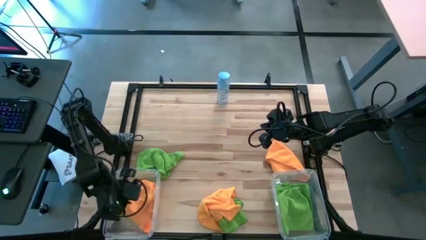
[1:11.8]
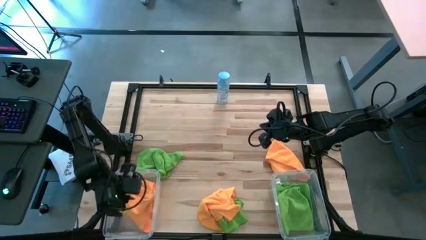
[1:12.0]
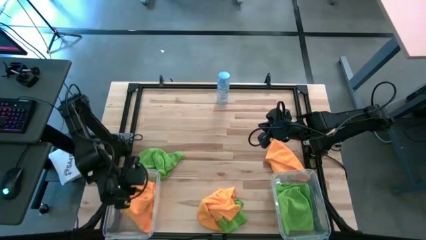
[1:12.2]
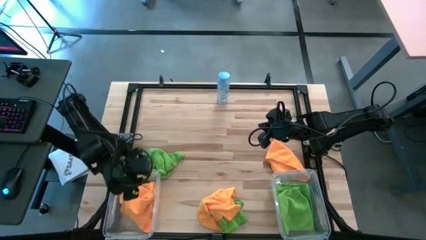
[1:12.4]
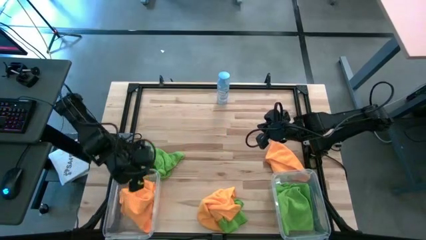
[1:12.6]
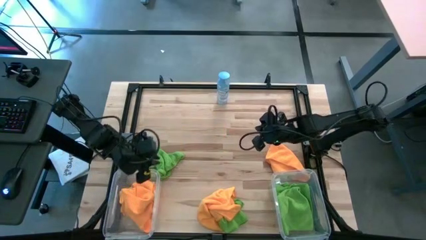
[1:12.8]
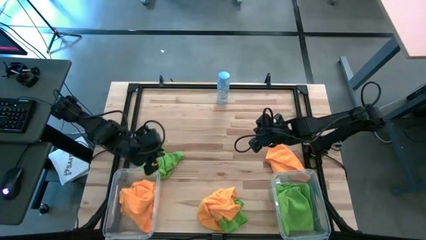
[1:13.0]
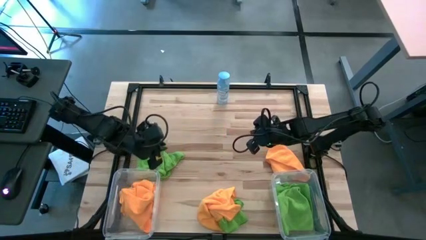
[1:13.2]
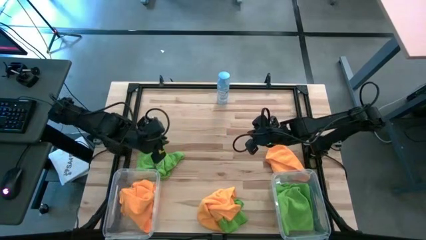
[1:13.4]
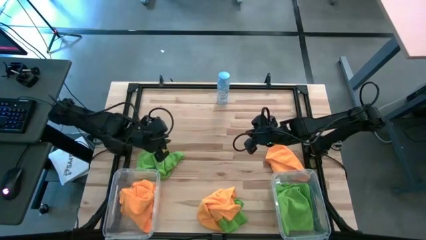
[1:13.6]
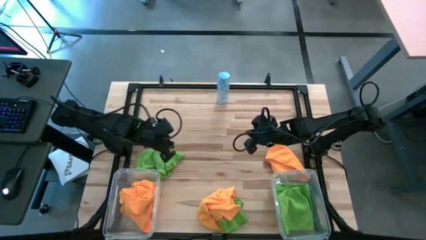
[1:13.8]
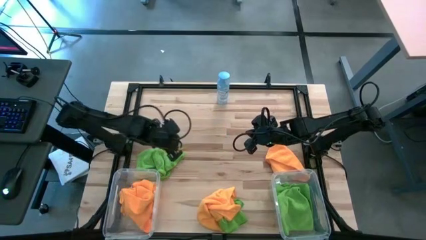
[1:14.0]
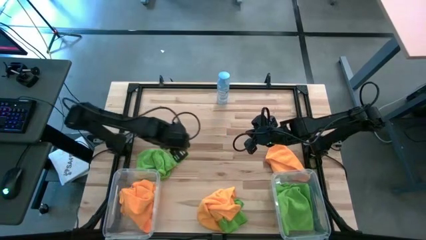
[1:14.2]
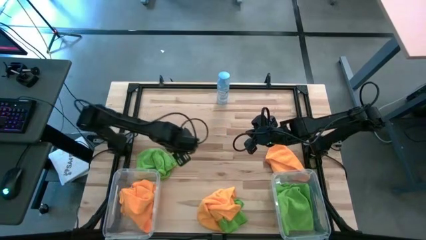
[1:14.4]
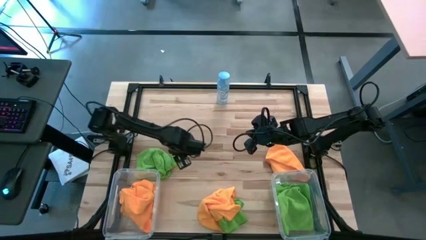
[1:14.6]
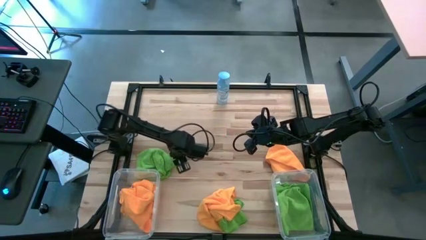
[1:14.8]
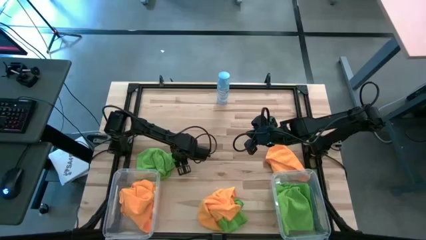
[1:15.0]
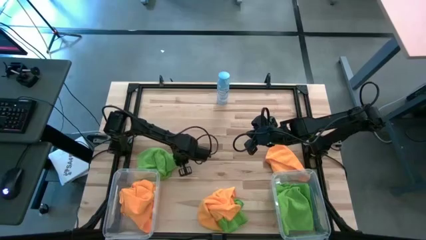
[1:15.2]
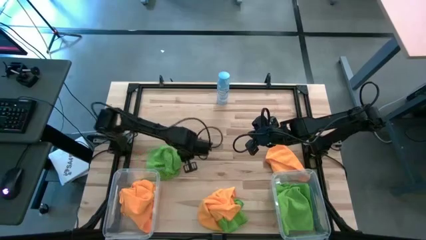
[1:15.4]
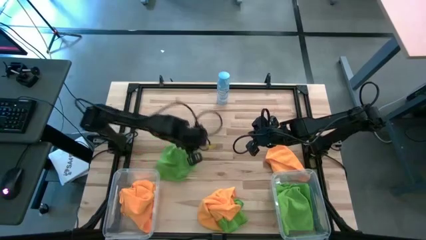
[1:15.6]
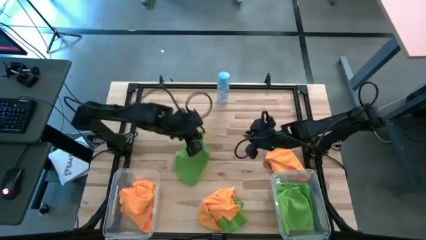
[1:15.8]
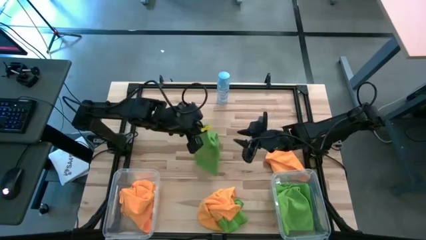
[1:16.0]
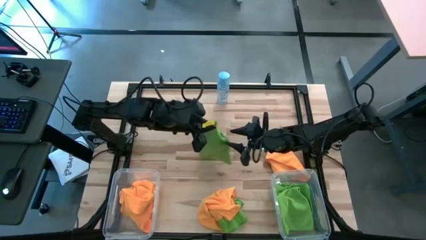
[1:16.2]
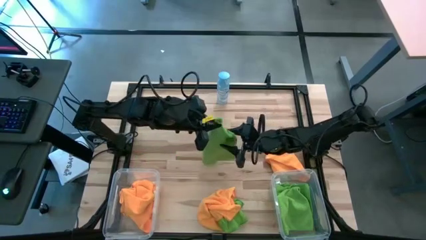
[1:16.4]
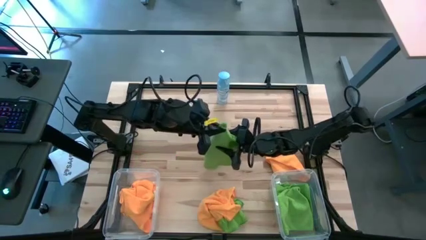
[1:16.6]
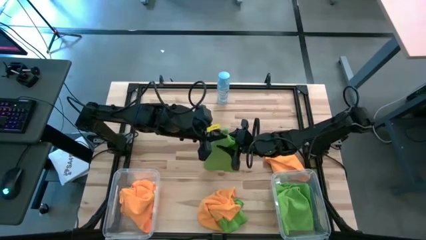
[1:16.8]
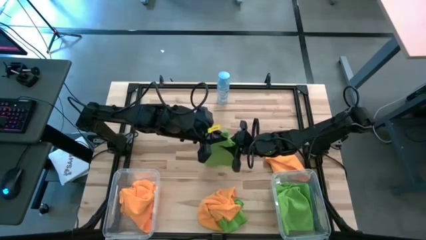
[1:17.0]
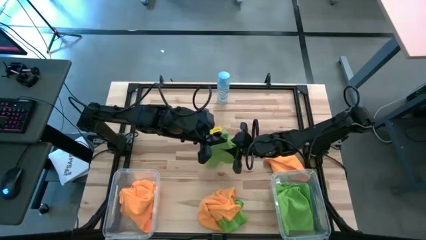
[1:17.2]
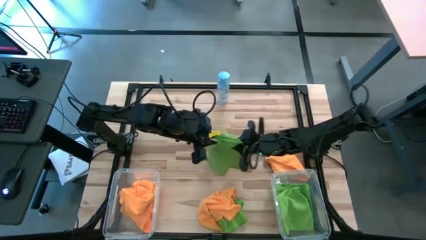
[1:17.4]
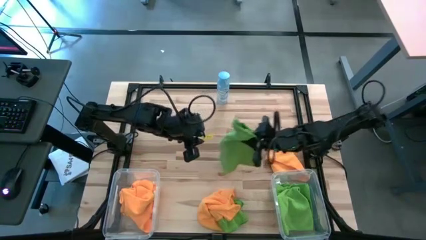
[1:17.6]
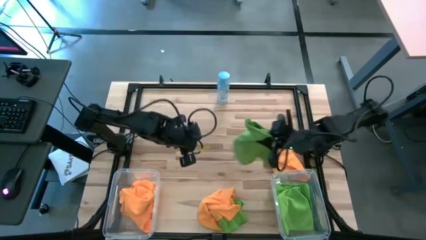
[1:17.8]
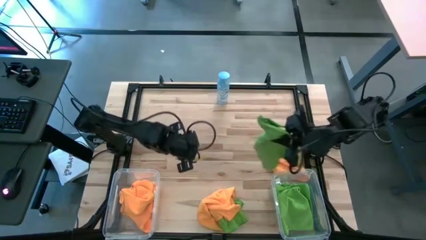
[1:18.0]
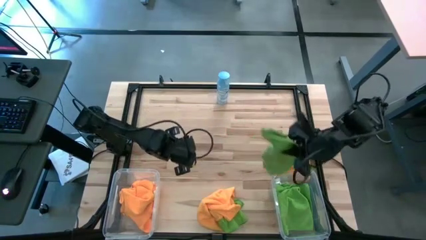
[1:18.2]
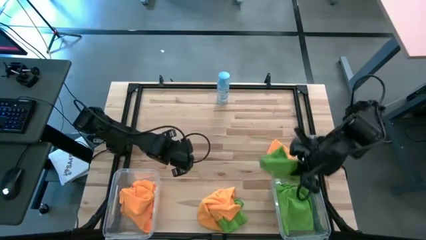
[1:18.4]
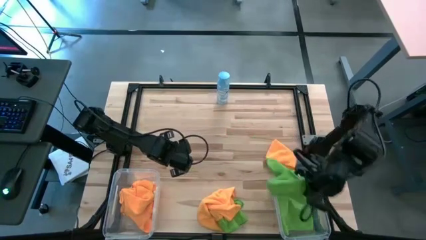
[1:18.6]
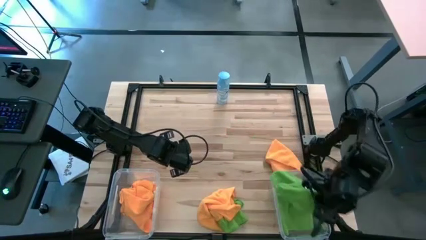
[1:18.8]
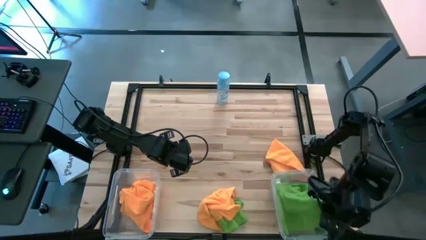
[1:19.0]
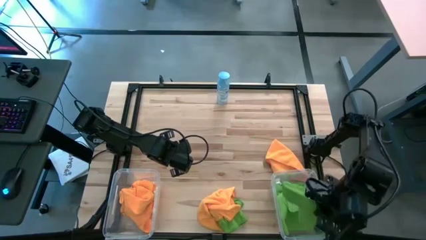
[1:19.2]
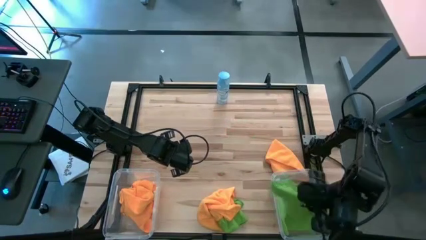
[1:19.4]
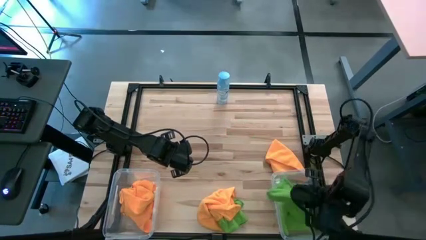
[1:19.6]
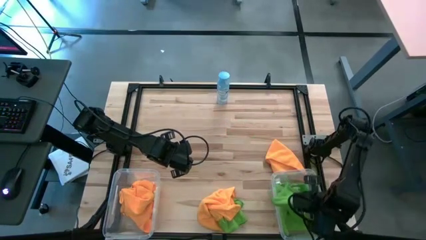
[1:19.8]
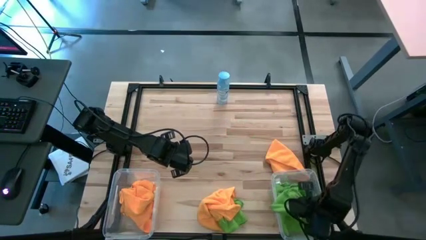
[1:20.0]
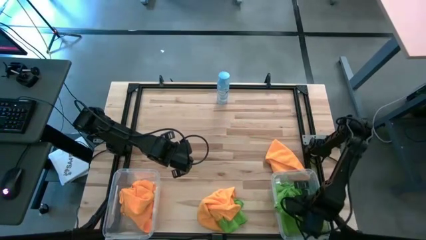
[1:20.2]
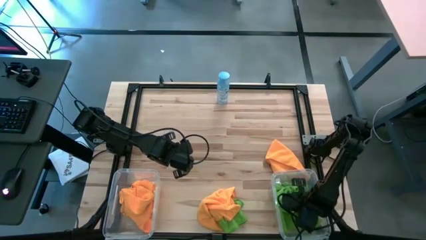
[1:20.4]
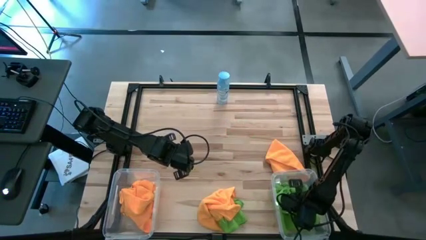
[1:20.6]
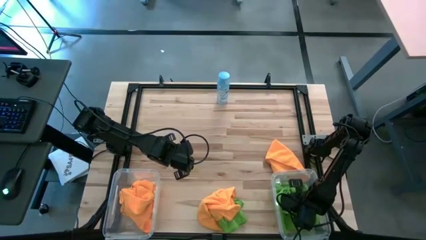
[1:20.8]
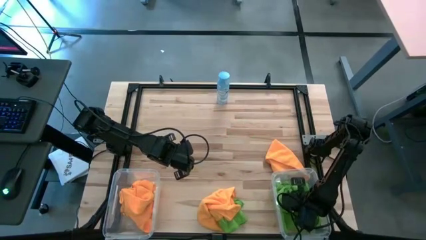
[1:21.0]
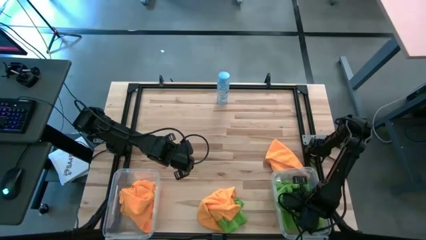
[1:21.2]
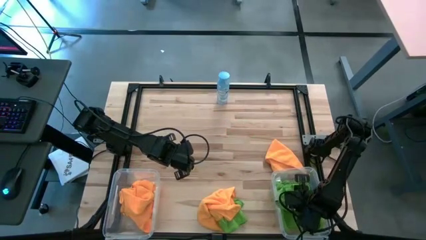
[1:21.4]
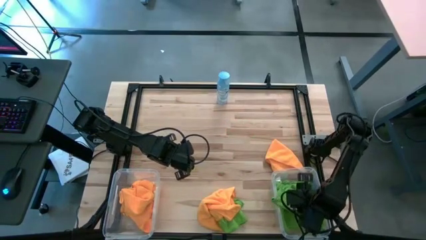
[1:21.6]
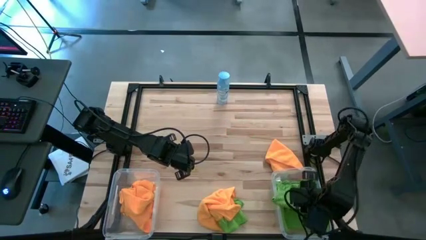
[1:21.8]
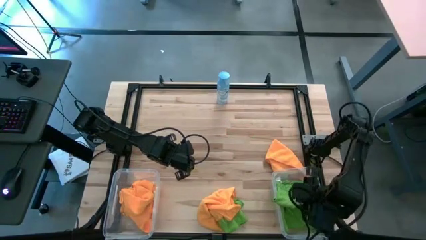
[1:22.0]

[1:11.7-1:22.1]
Task: Sort microfiber towel by color & place in baskets
Put the green microfiber cloth into the right transparent bin

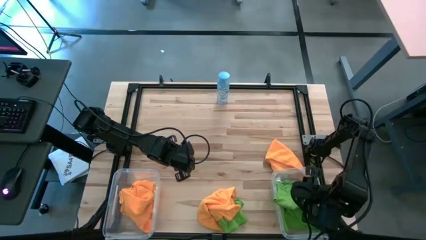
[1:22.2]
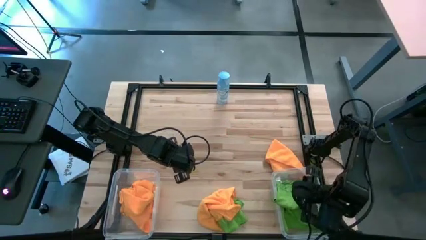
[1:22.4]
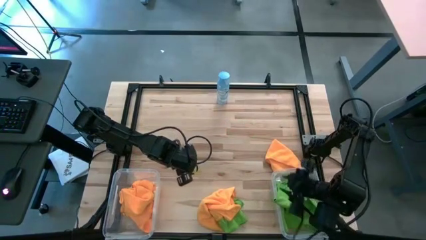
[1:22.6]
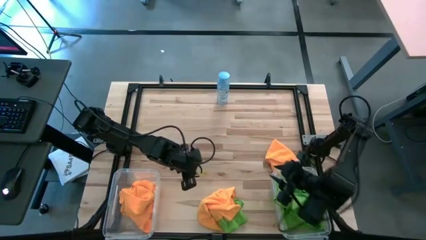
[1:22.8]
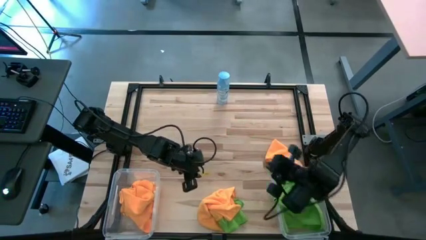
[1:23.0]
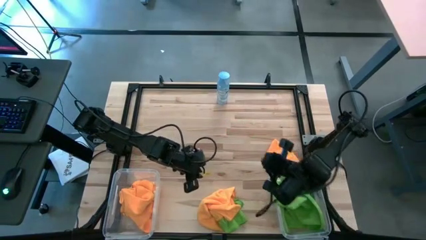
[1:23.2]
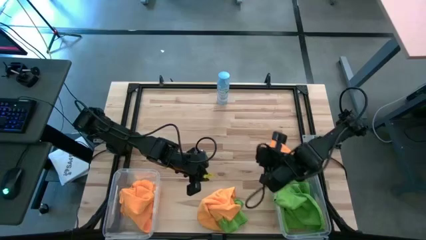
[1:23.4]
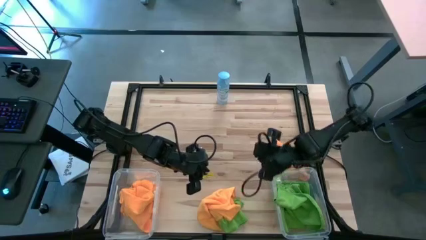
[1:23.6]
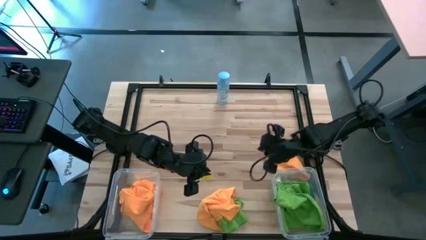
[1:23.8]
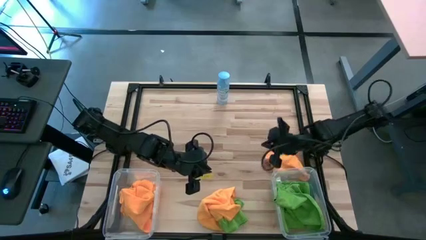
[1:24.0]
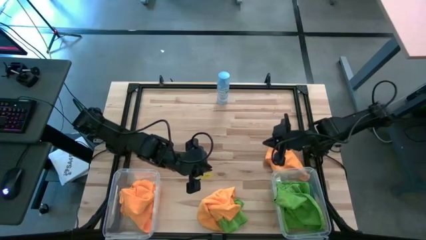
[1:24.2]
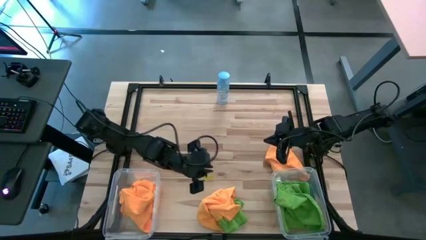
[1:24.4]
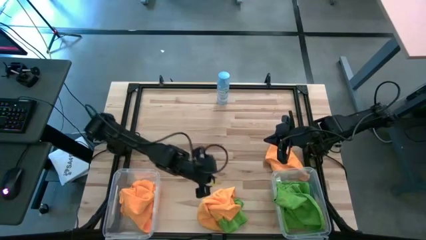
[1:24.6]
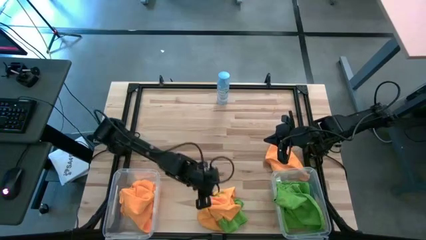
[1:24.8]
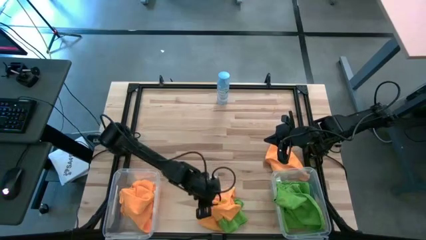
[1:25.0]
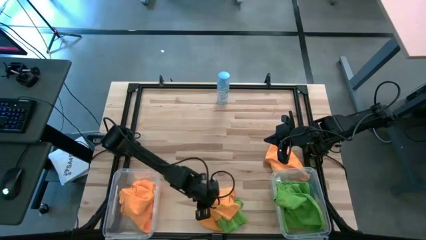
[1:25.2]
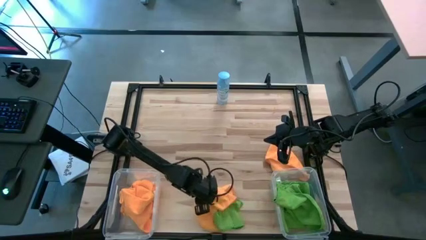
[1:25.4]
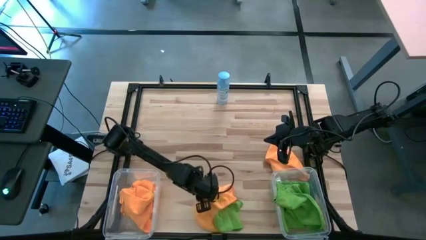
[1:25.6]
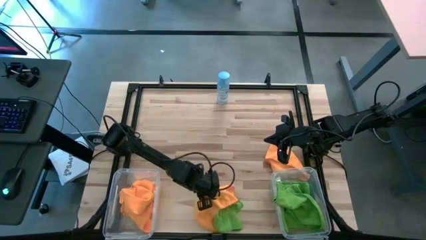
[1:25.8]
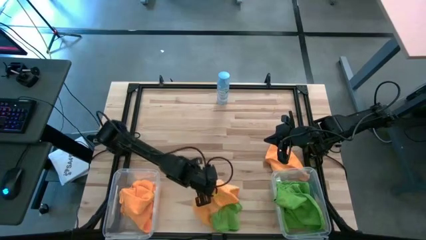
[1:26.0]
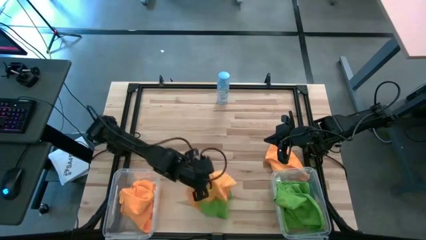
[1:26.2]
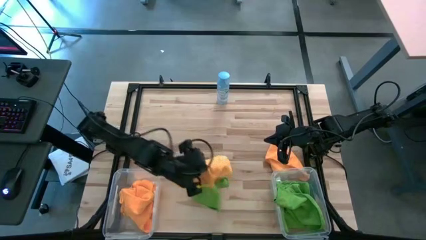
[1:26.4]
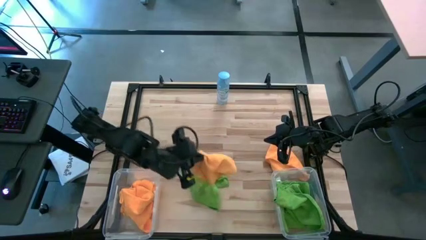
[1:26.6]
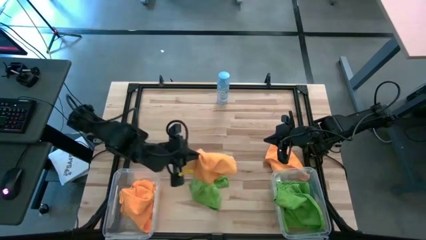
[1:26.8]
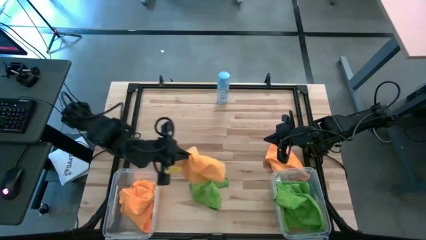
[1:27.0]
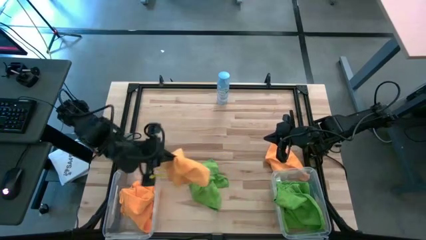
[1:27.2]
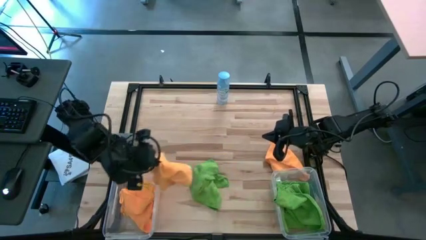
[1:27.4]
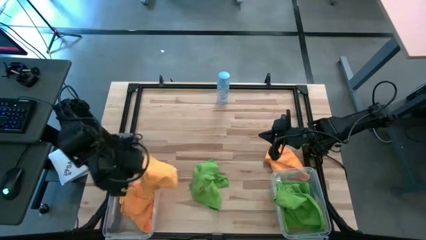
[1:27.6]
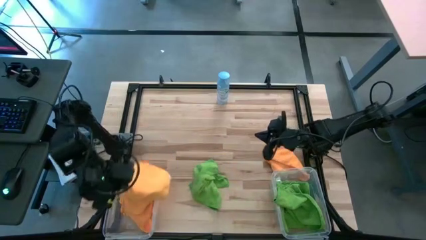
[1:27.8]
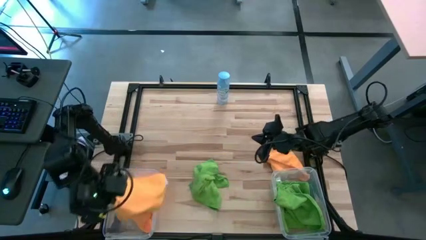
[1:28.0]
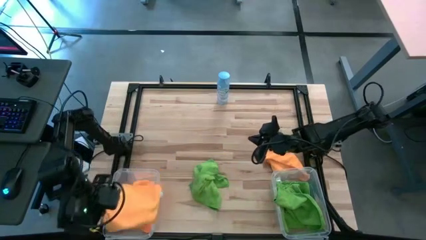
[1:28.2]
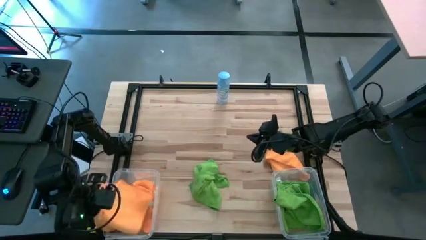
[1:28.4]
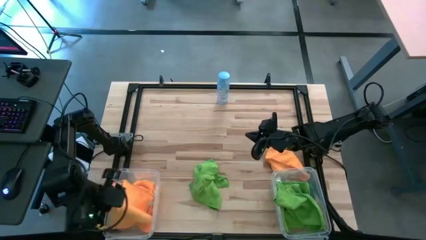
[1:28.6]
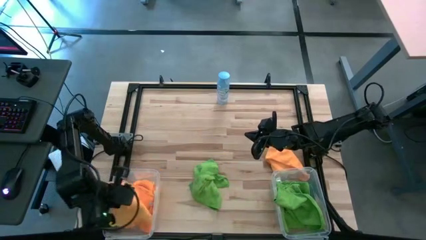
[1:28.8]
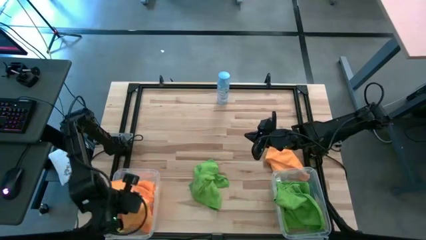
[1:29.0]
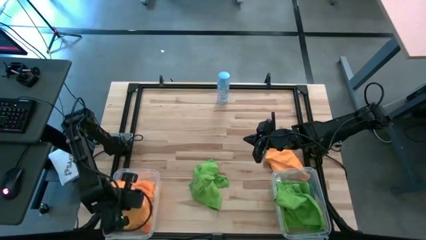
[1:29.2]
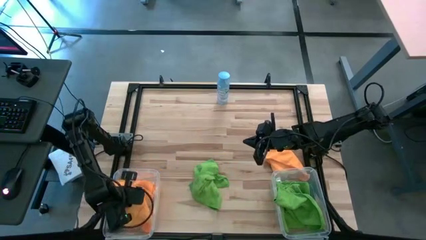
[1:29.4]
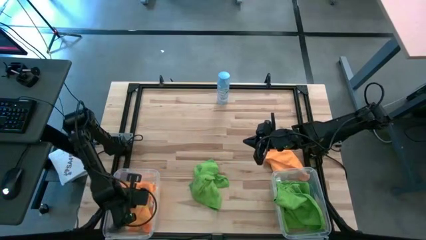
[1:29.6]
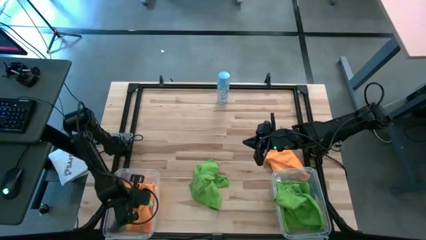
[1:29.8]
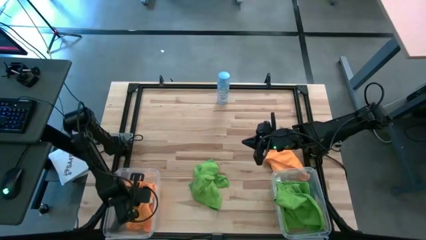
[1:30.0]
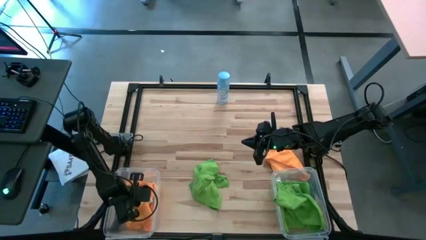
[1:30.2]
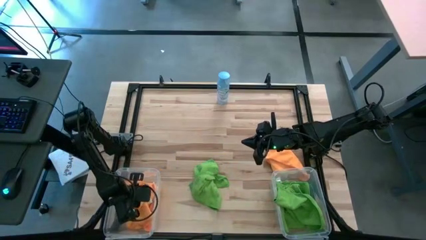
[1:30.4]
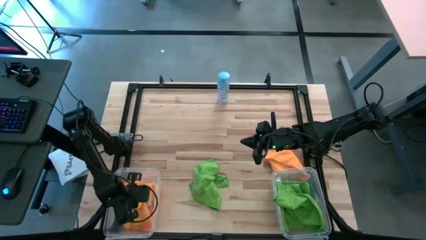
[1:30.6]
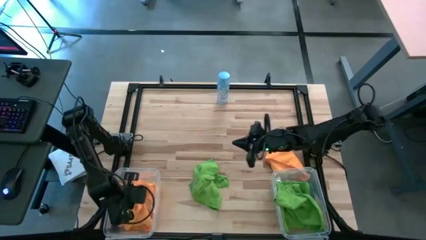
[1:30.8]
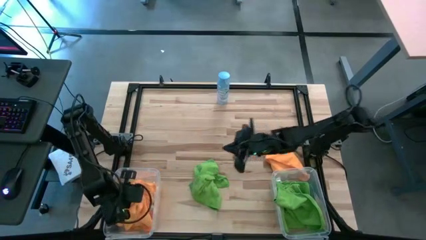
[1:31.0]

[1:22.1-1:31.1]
Put the orange microfiber cloth into the left transparent bin
